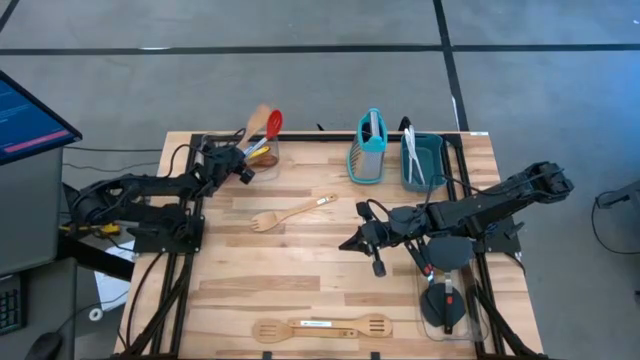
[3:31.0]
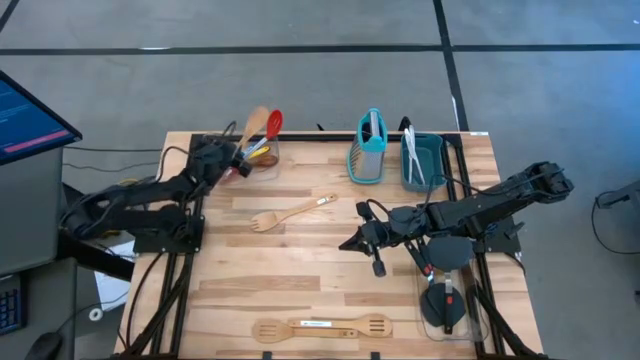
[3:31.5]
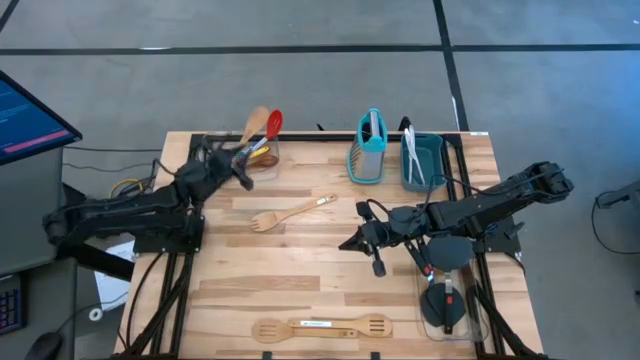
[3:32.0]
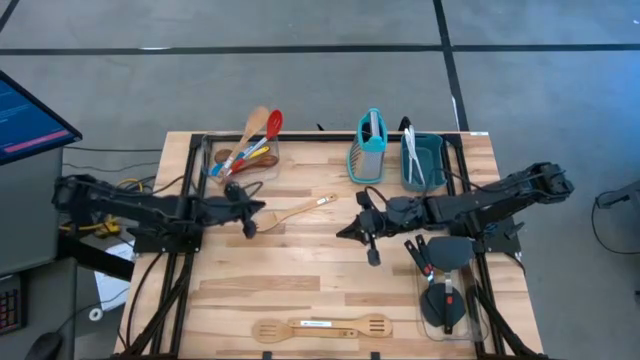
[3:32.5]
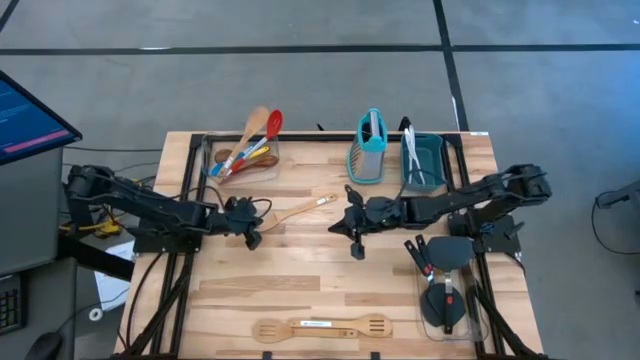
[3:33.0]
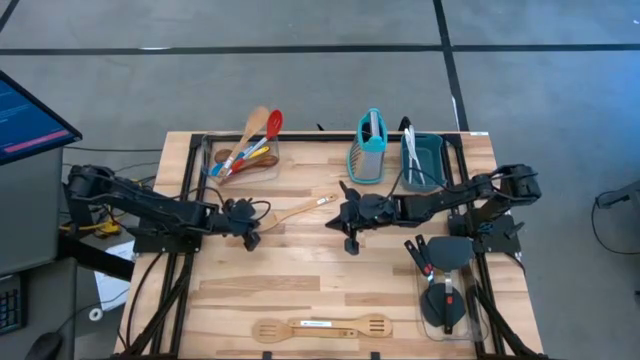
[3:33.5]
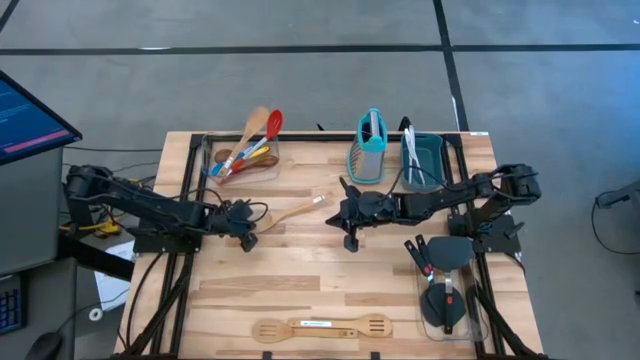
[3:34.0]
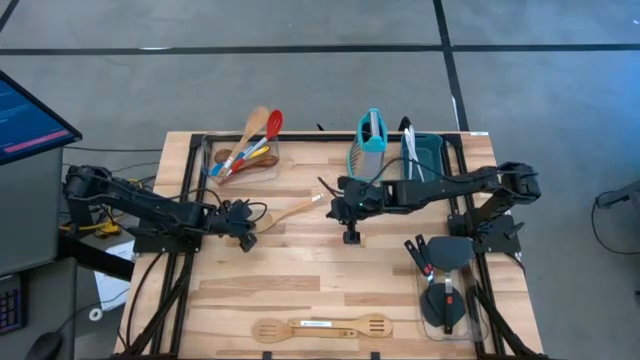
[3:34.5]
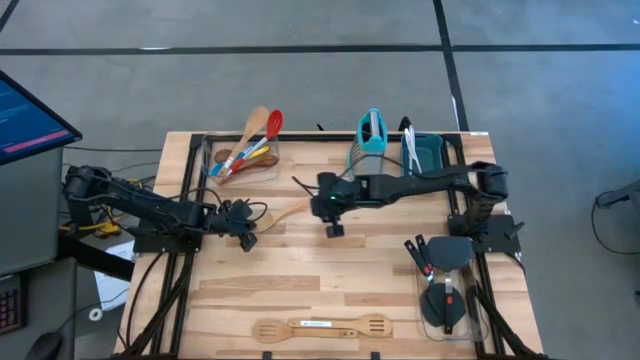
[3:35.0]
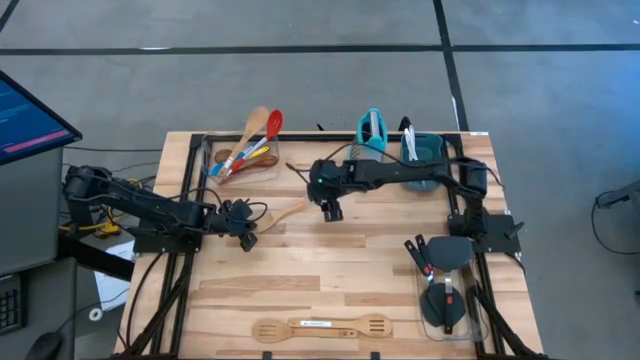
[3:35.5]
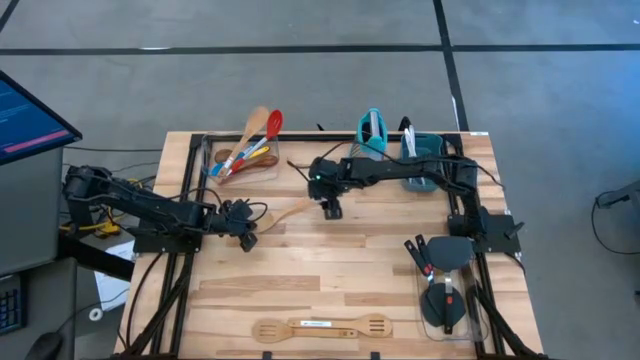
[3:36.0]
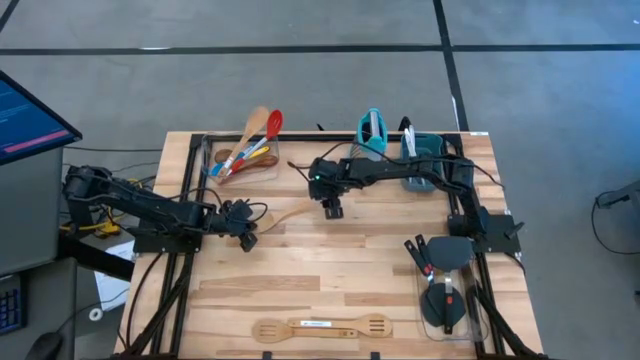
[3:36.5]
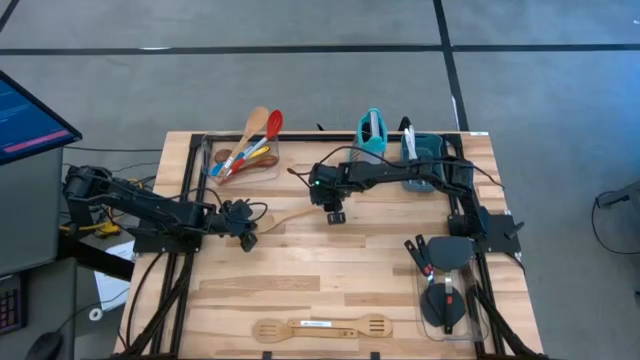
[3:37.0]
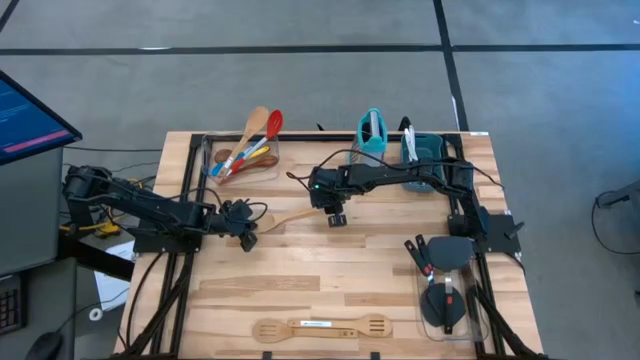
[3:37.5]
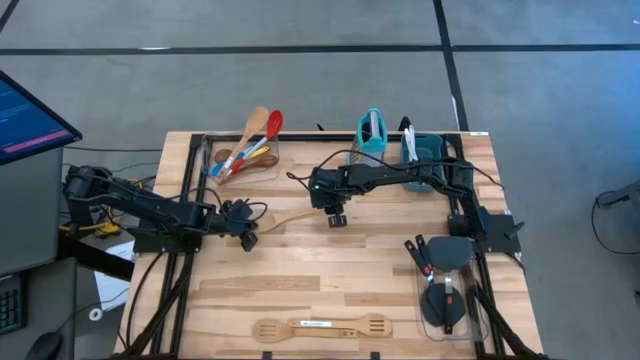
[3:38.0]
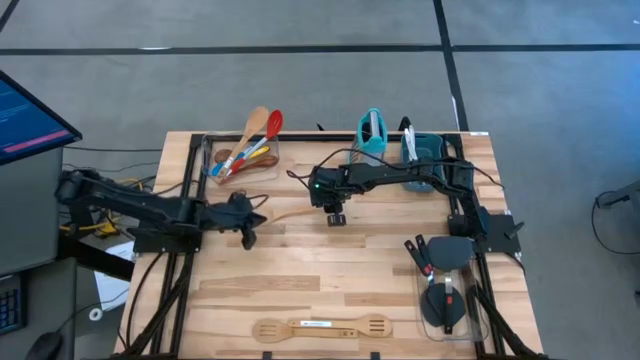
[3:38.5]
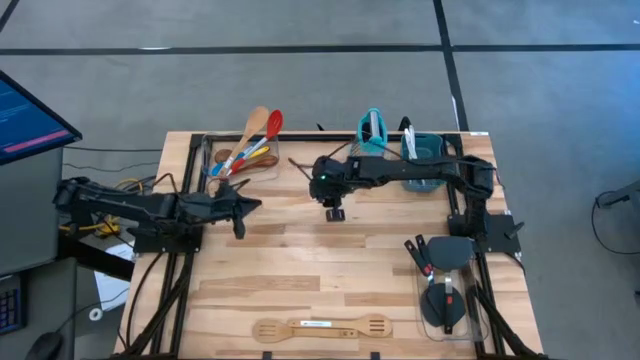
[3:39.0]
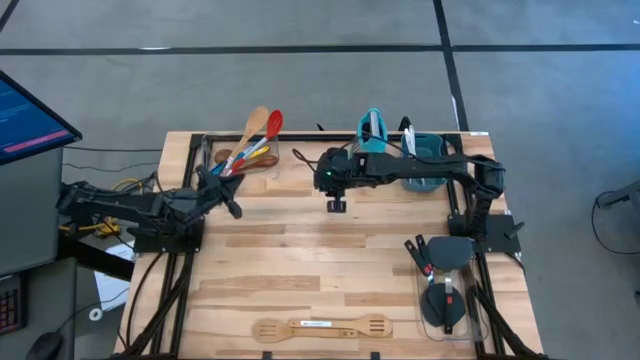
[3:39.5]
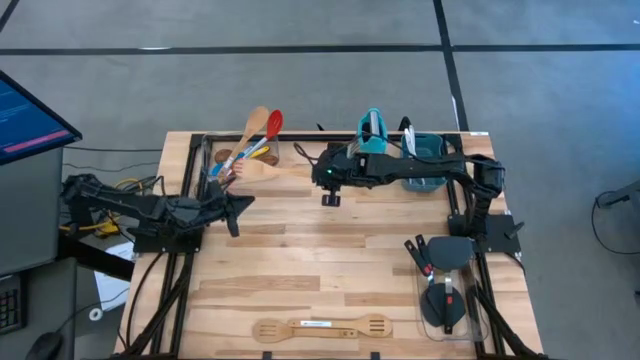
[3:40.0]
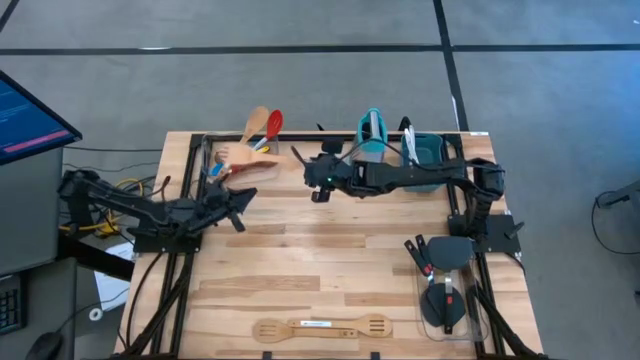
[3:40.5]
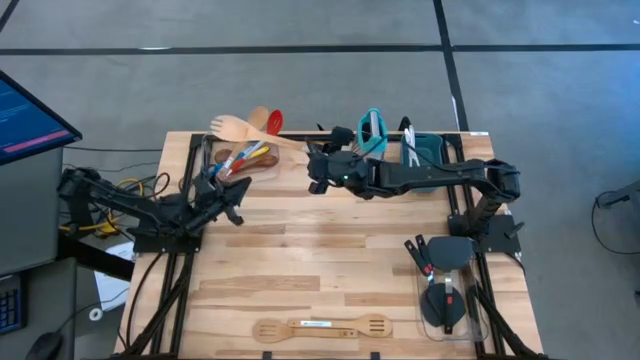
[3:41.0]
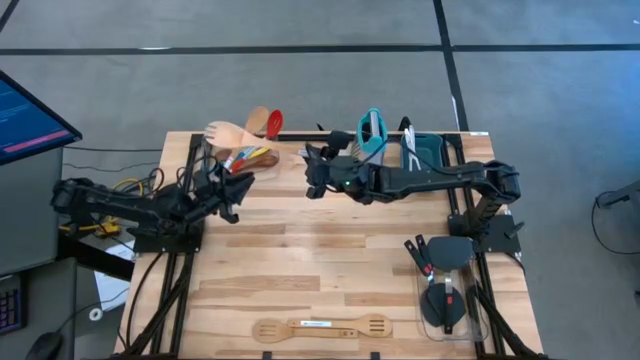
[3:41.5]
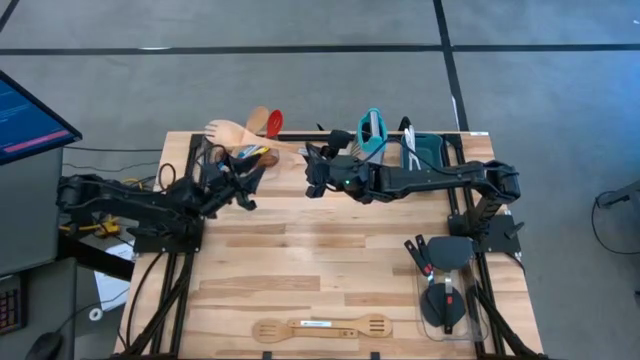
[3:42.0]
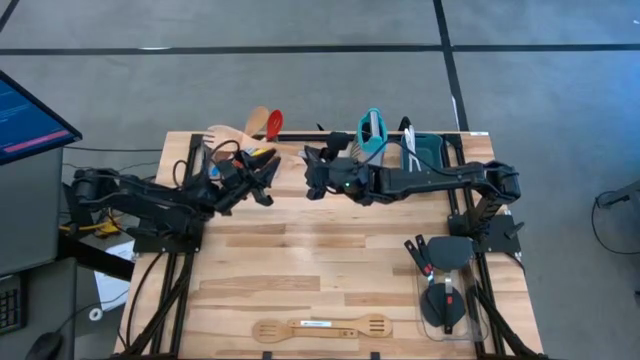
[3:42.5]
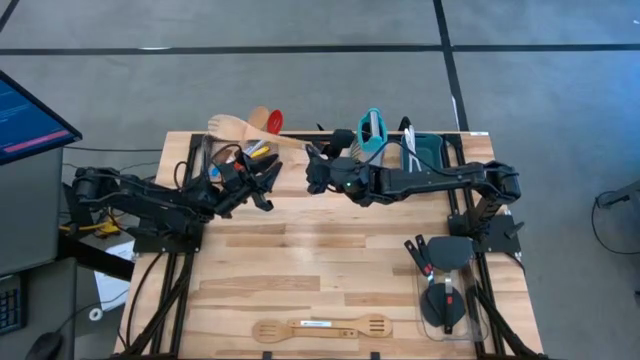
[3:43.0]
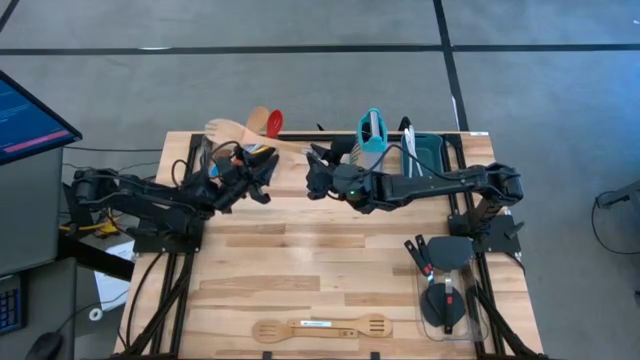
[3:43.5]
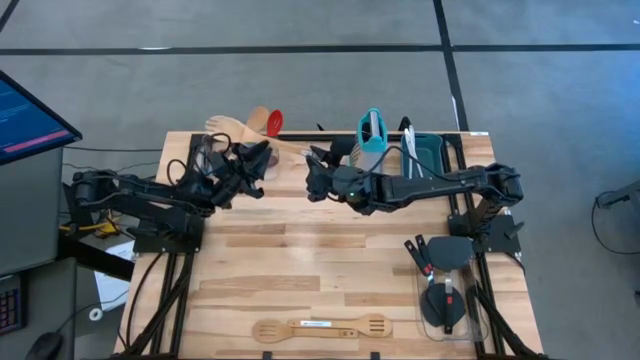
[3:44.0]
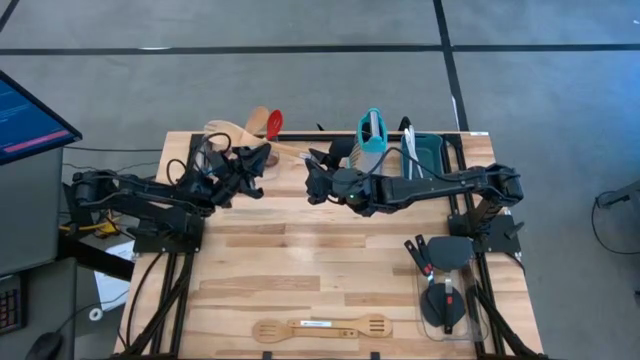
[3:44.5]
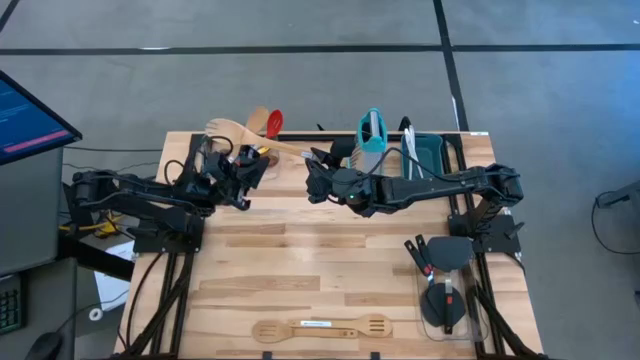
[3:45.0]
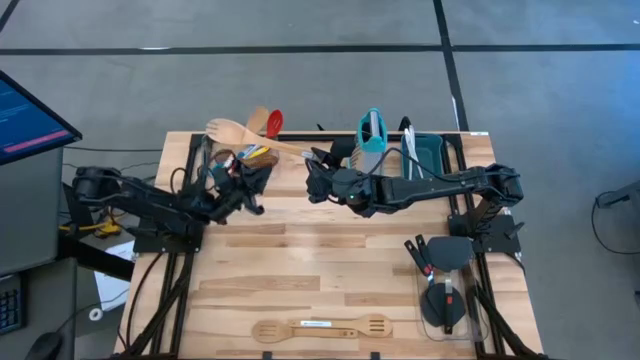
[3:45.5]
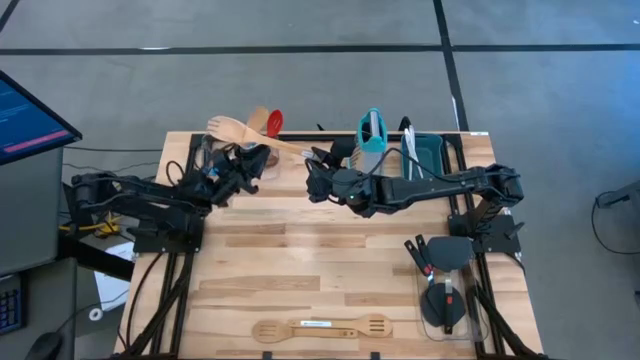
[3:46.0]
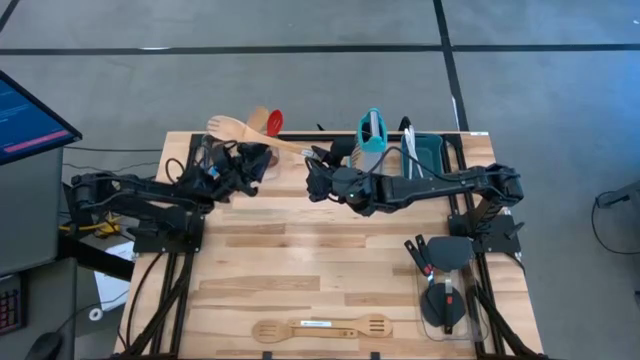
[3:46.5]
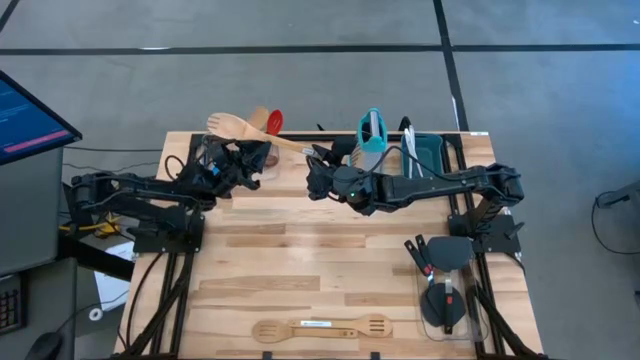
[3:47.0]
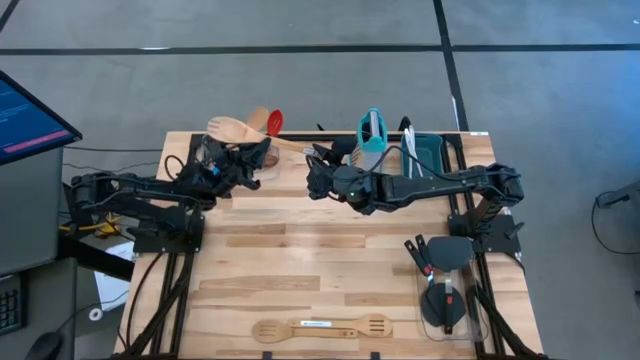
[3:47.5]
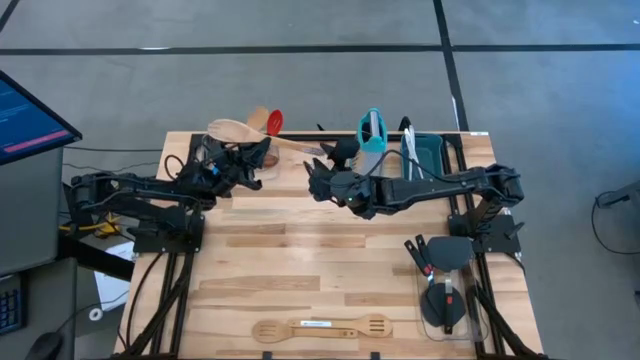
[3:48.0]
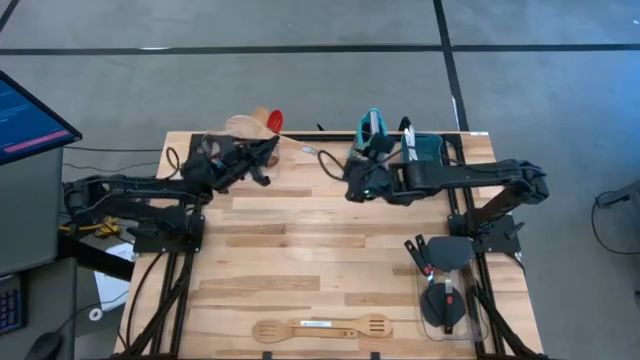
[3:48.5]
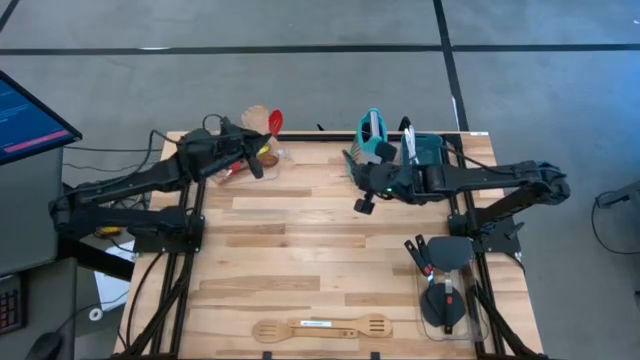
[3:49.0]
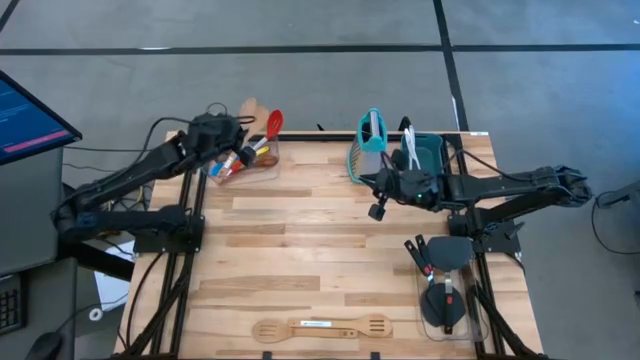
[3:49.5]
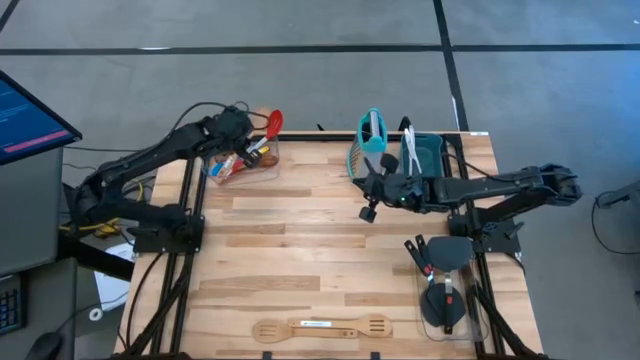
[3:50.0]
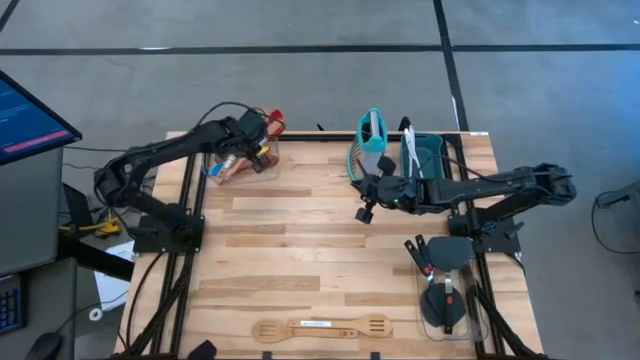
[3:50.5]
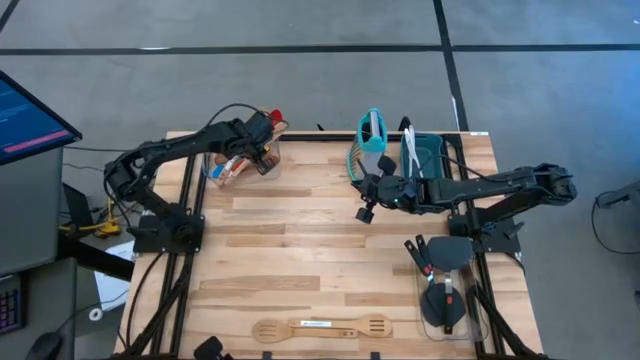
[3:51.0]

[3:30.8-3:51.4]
Task: Pick & Place Kitchen Items
Put the wooden fork into the left transparent bin
